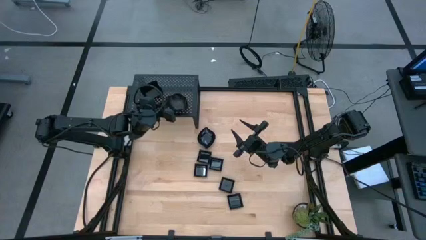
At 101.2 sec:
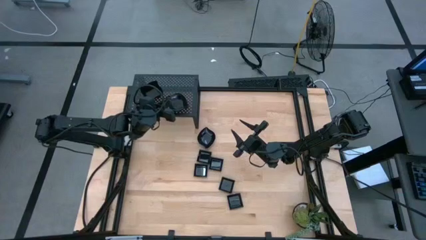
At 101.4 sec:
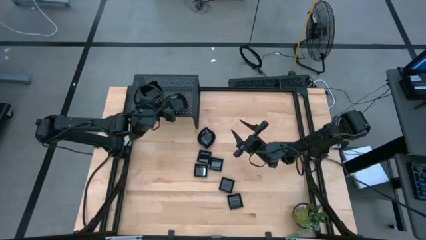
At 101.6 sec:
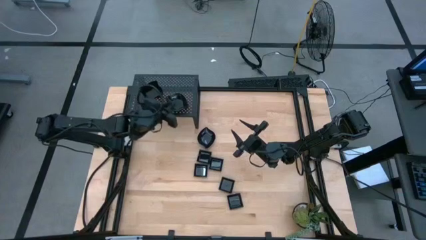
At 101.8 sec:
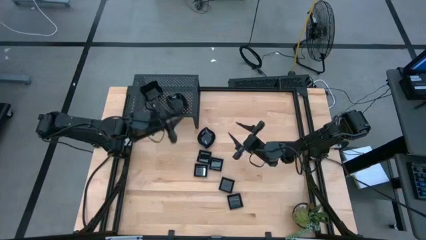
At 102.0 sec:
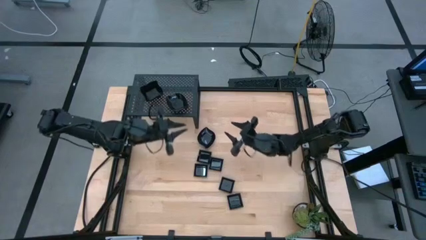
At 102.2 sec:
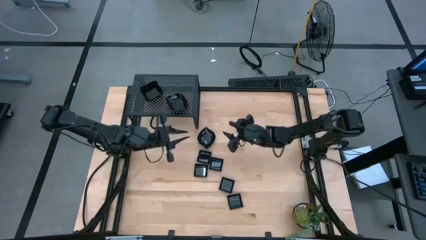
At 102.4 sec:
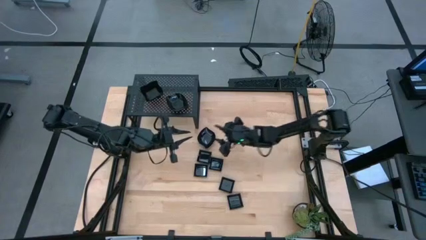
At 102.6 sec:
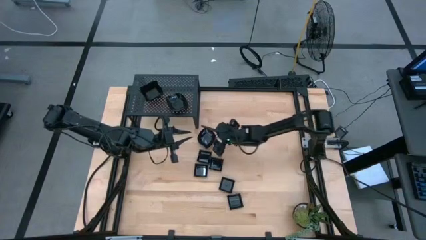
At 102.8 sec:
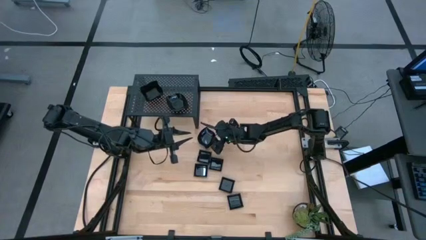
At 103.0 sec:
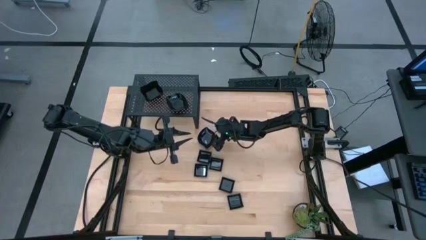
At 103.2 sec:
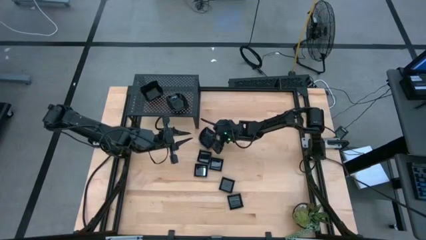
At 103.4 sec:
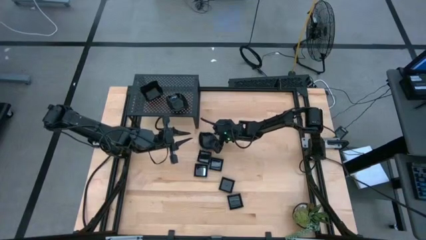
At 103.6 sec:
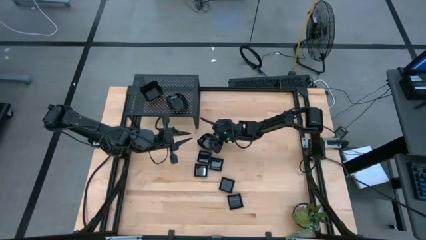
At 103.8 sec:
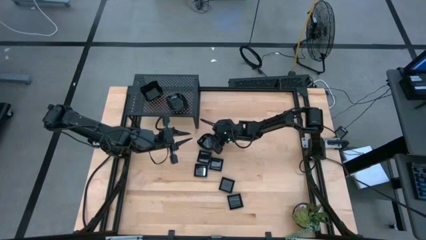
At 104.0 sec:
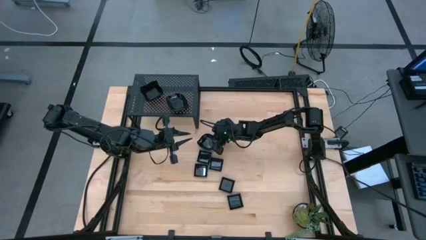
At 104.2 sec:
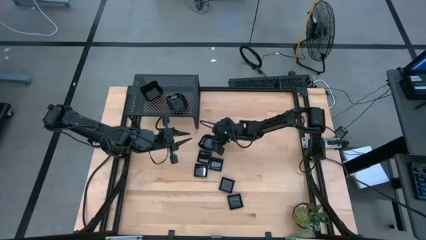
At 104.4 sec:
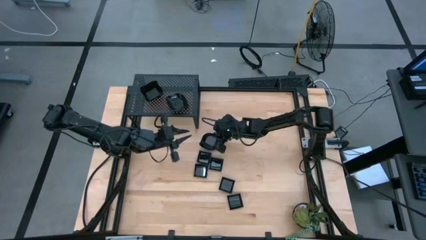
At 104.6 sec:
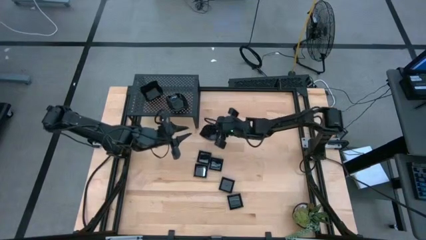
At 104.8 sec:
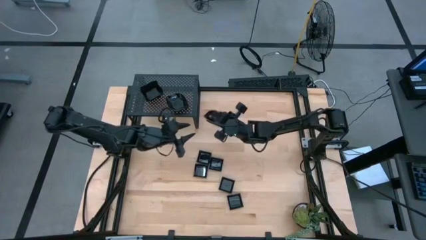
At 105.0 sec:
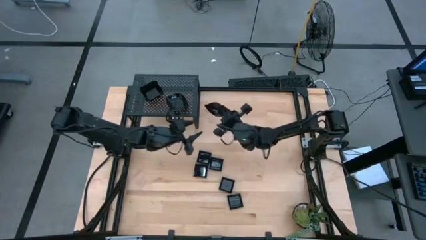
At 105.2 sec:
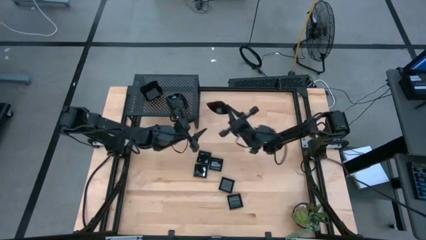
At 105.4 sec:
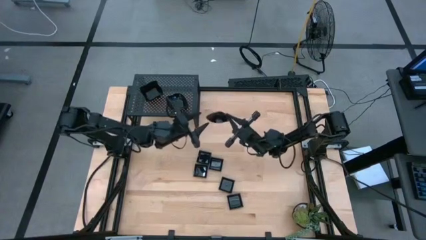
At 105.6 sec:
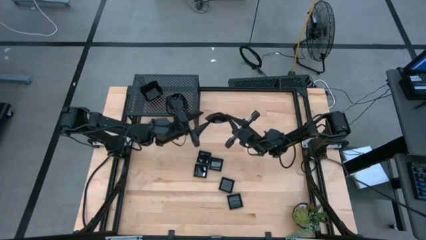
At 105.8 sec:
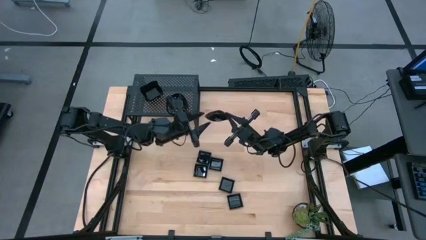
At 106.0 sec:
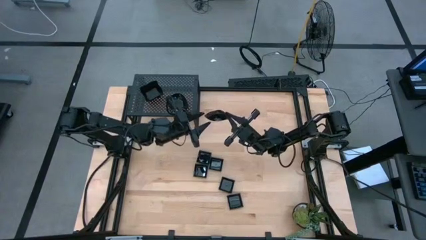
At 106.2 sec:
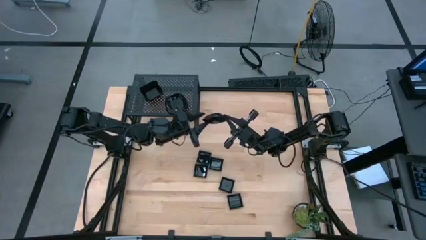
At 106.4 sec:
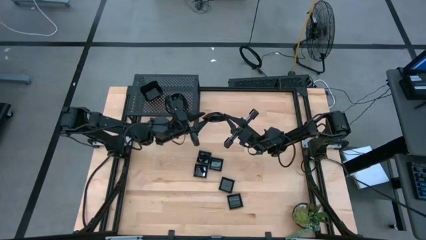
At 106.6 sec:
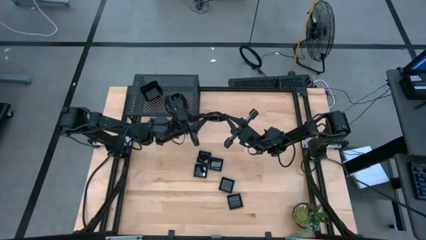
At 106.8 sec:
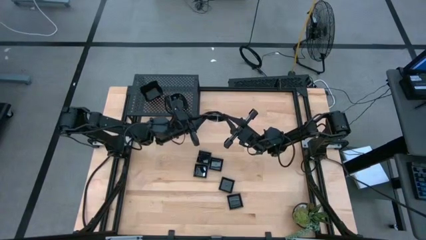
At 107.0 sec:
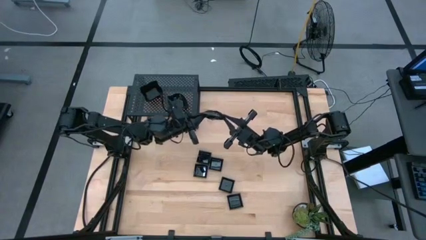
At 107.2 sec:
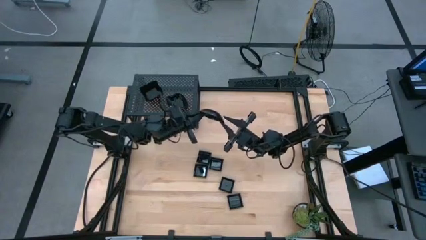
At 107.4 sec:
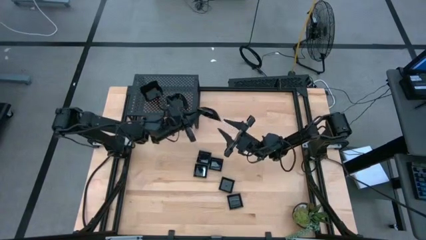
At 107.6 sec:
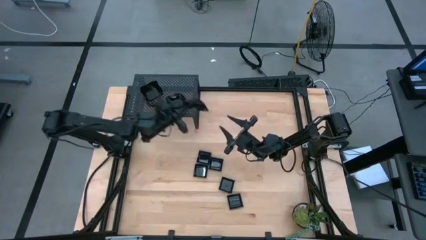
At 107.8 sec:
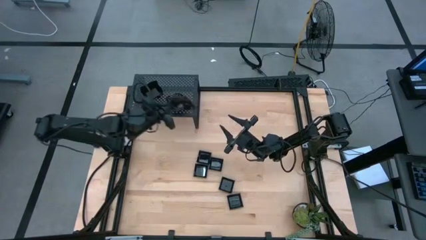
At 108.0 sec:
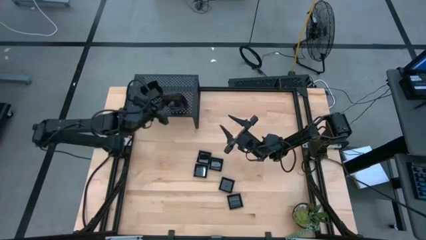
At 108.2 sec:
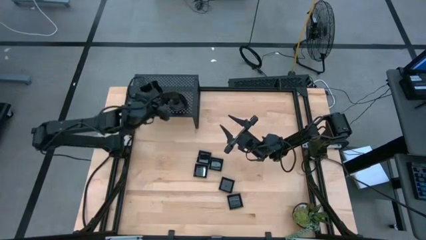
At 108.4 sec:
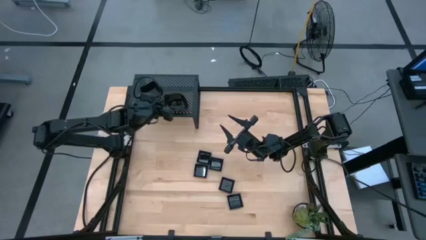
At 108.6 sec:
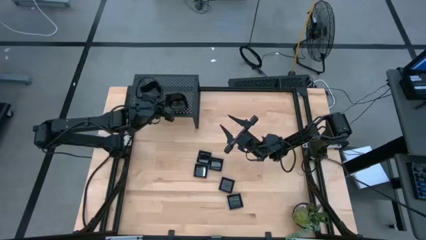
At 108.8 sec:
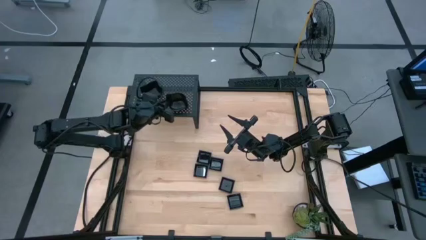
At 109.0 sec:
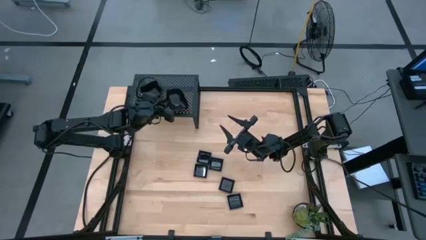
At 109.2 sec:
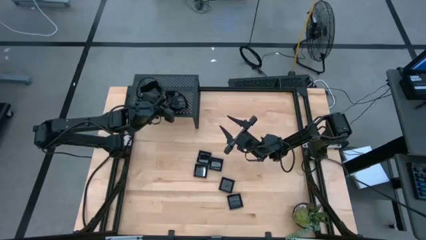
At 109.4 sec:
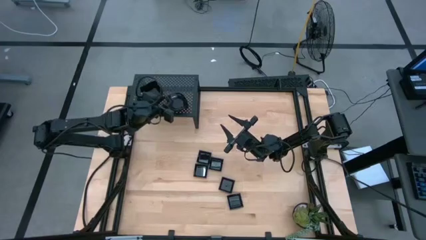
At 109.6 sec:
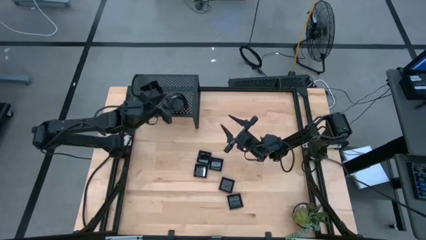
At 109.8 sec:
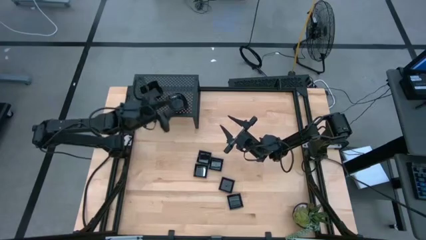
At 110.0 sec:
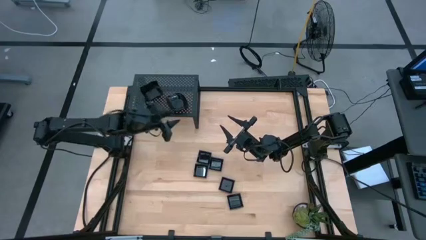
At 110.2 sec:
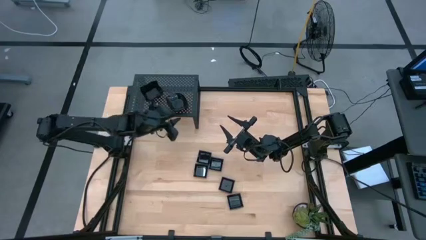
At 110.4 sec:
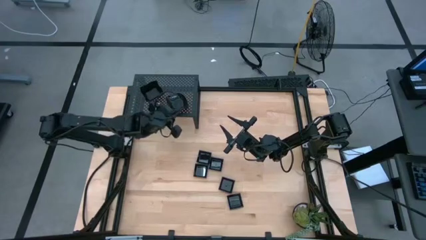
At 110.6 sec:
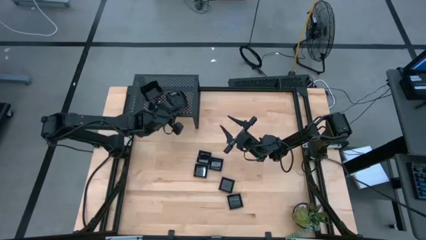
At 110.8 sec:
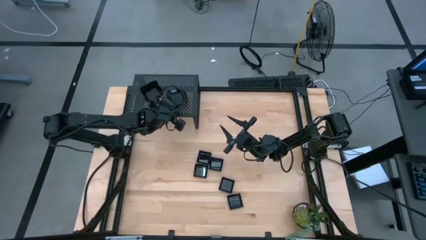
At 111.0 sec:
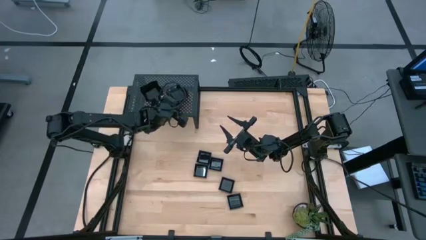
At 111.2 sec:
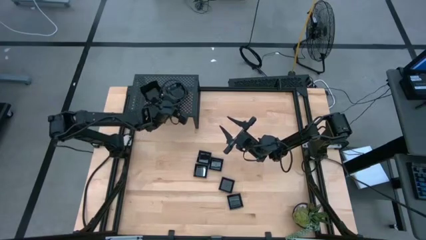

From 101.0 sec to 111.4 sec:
Task: Pick & Place Mini shaped plates
Stack the leaf shaped plate on top of the leaf shaped plate on the shelf

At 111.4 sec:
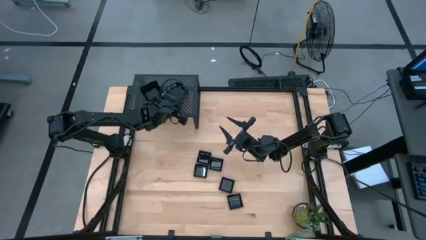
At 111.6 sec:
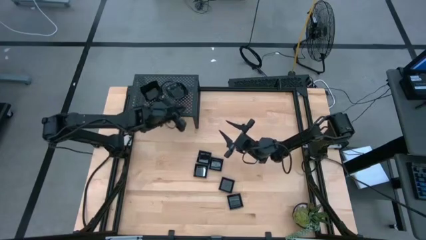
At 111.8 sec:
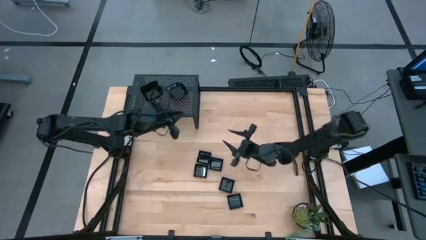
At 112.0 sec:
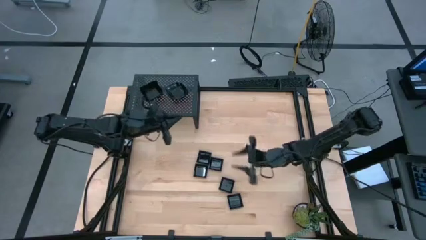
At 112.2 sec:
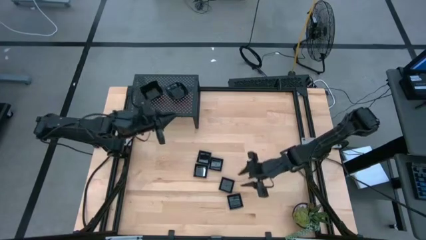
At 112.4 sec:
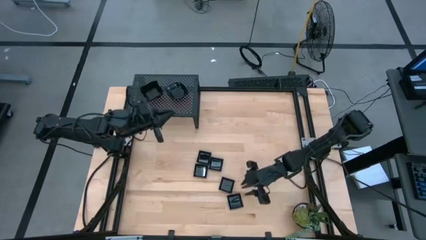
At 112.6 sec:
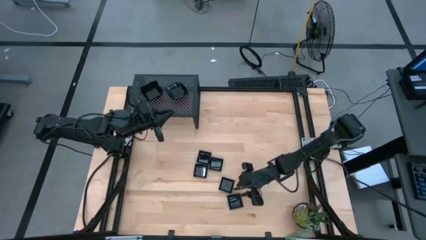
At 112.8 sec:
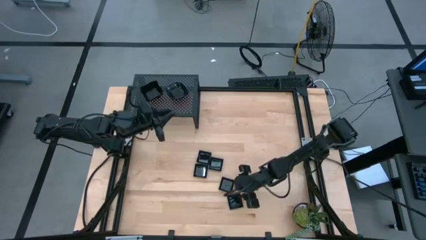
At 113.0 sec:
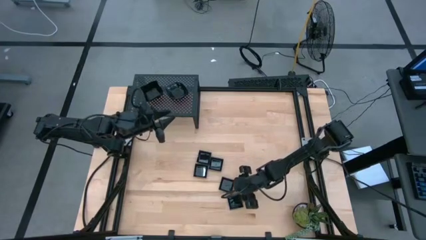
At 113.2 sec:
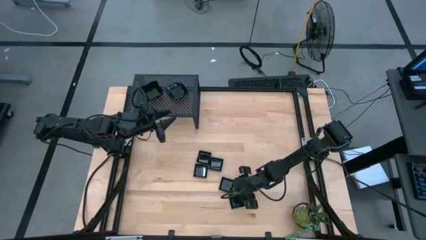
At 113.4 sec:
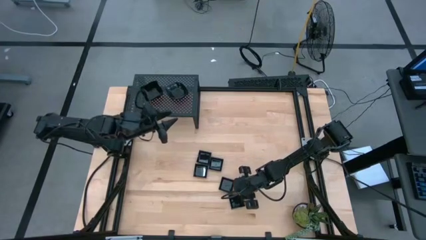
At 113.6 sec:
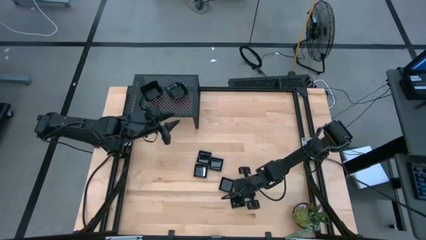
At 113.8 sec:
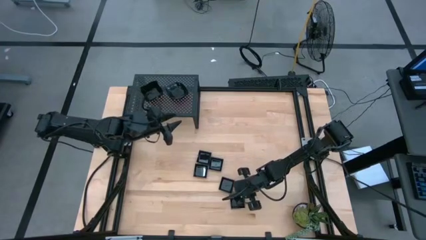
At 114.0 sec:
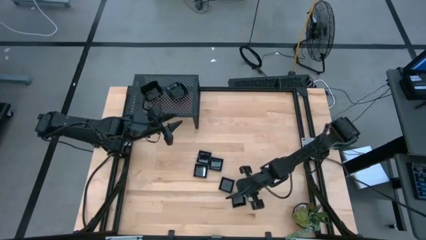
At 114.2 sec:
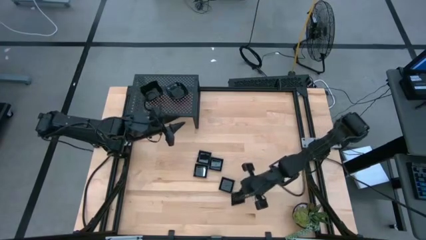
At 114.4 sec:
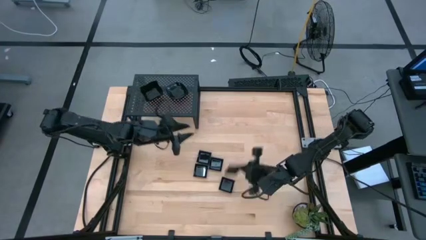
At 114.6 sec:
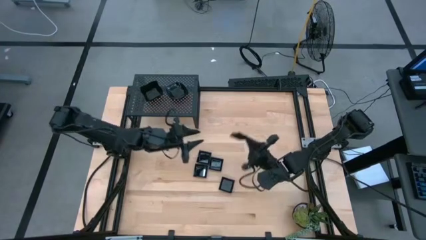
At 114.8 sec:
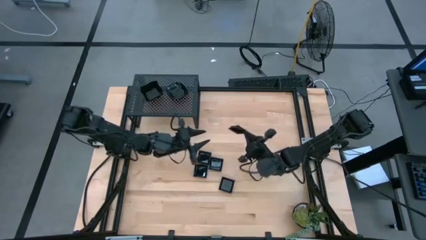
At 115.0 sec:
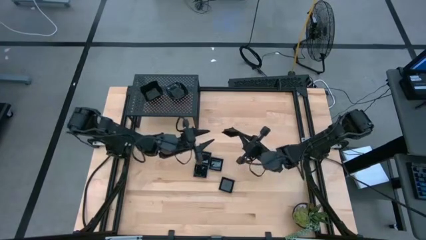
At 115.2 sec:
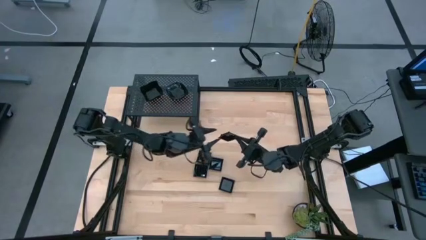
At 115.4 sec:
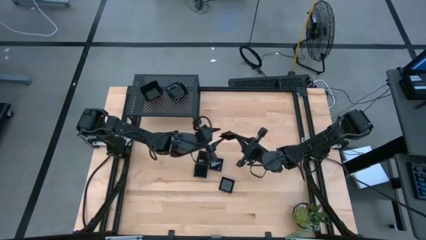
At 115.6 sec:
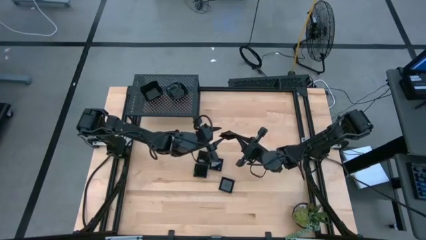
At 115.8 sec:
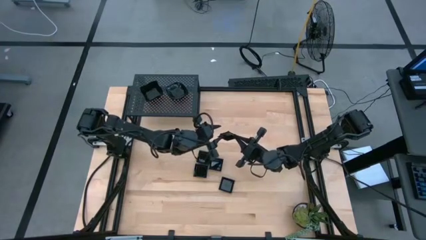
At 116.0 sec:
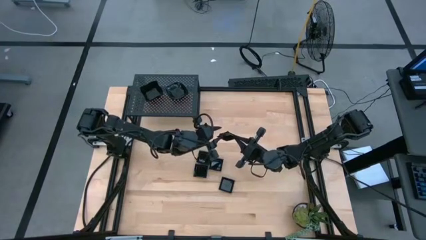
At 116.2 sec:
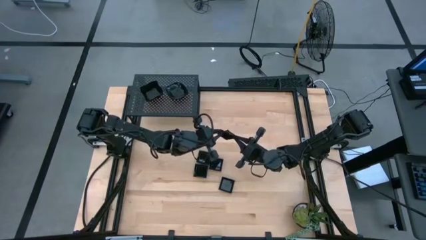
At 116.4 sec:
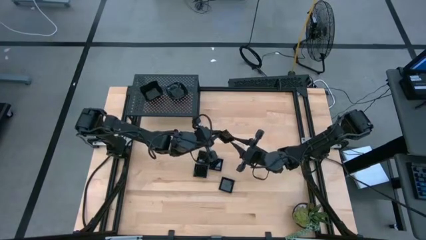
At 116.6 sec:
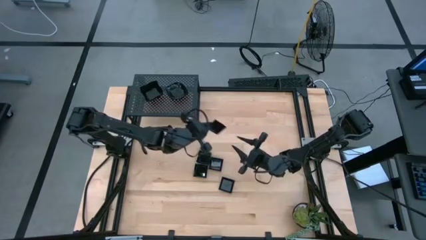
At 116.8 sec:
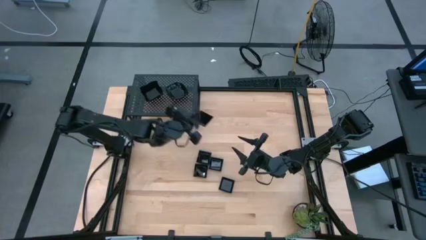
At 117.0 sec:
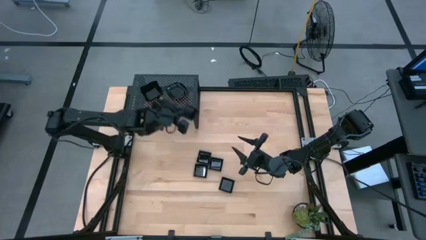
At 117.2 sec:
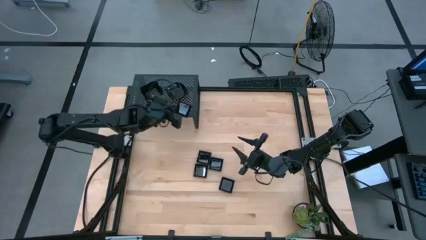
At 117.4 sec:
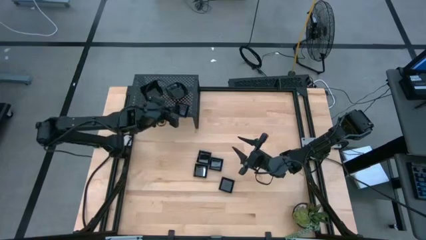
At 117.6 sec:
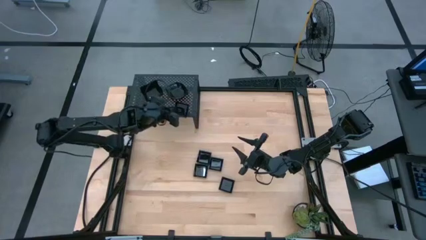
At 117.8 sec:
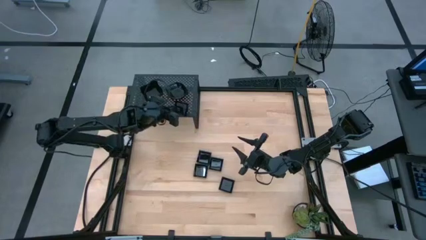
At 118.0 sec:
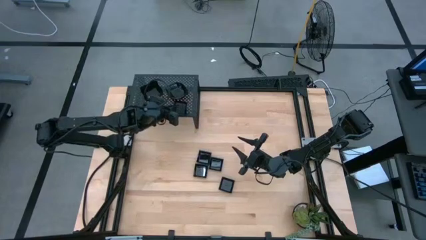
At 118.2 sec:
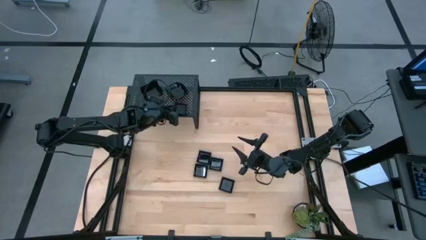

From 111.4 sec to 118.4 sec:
Put the square plate on the shelf
